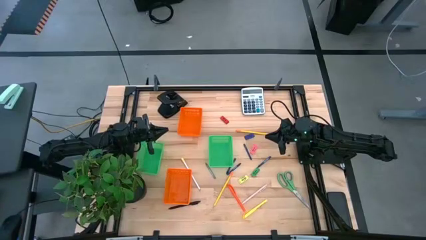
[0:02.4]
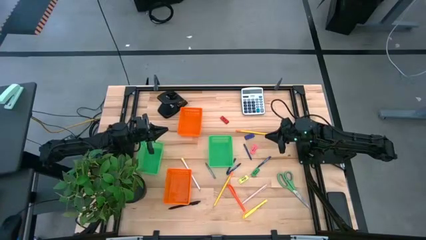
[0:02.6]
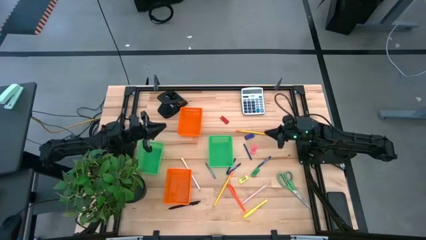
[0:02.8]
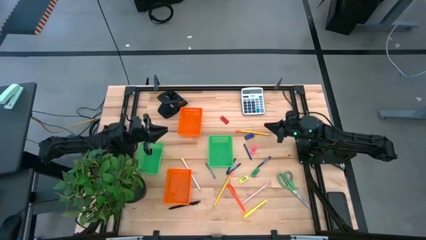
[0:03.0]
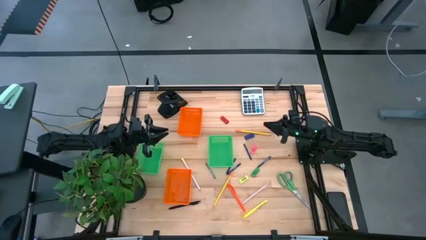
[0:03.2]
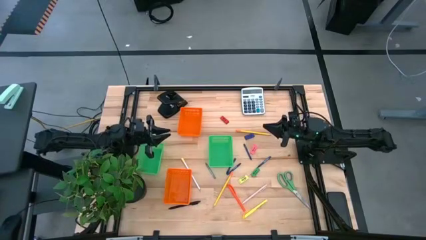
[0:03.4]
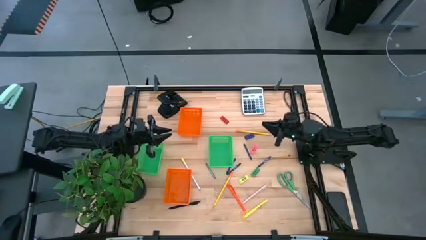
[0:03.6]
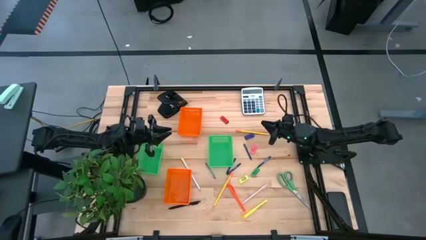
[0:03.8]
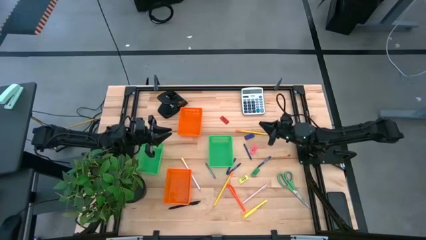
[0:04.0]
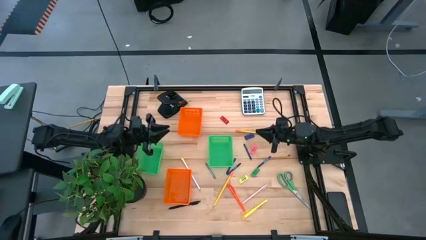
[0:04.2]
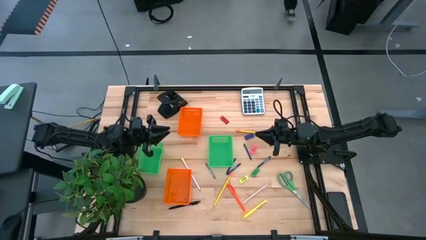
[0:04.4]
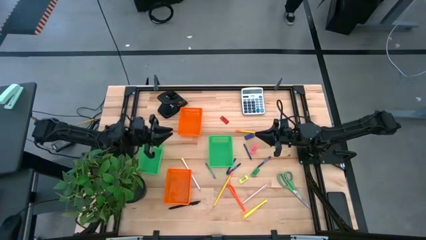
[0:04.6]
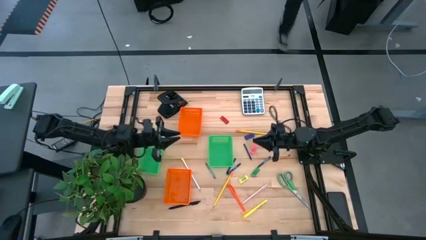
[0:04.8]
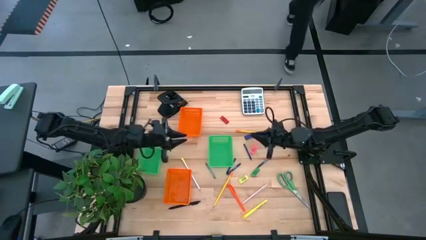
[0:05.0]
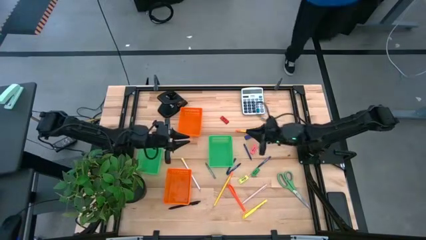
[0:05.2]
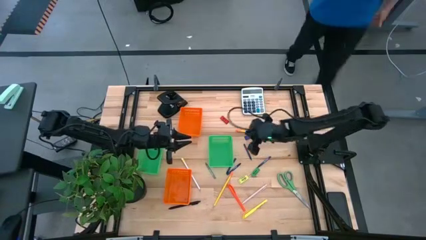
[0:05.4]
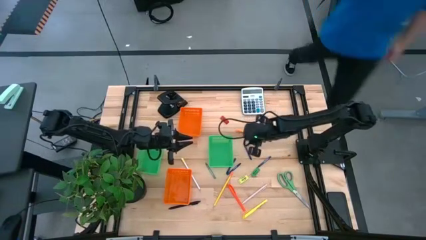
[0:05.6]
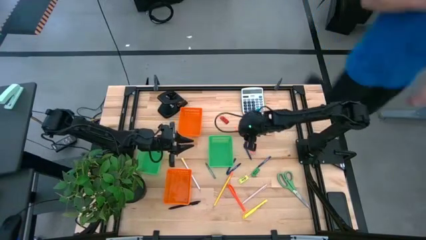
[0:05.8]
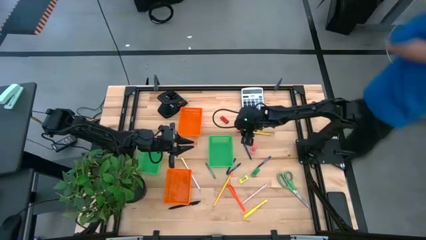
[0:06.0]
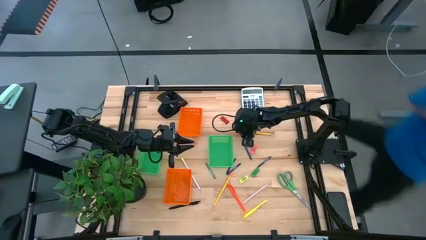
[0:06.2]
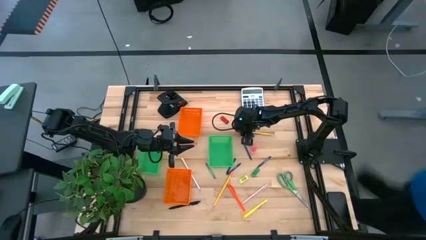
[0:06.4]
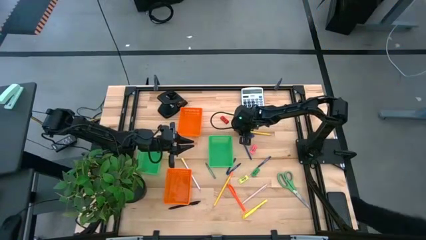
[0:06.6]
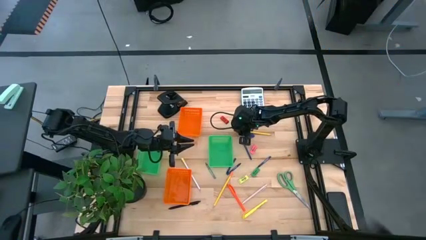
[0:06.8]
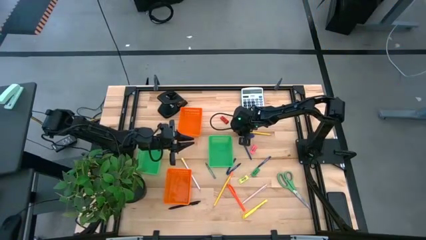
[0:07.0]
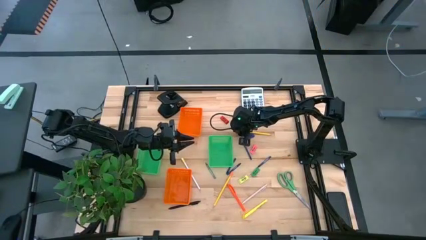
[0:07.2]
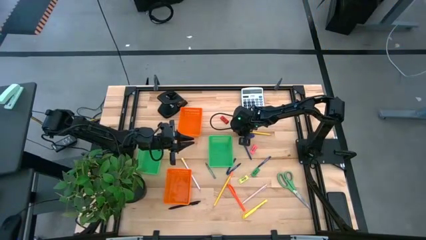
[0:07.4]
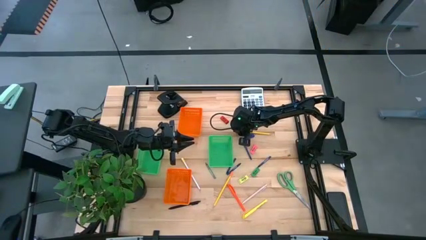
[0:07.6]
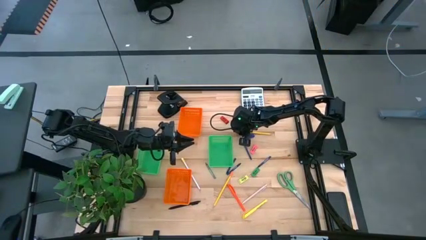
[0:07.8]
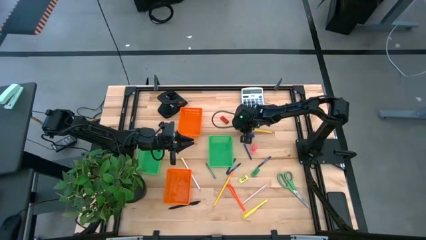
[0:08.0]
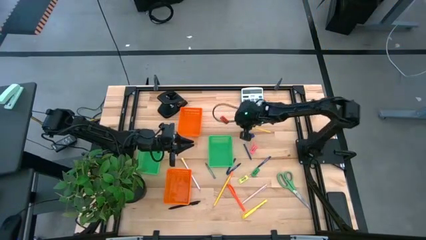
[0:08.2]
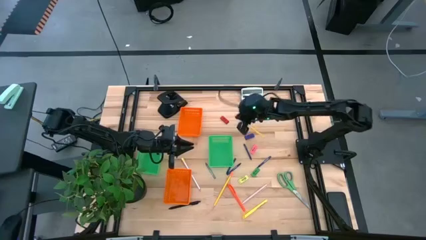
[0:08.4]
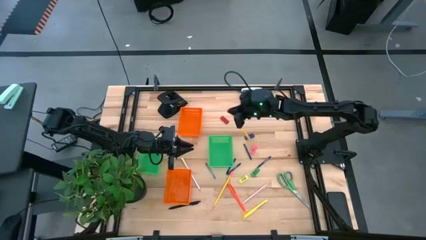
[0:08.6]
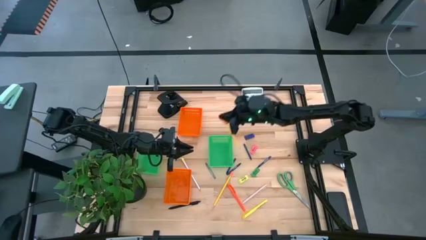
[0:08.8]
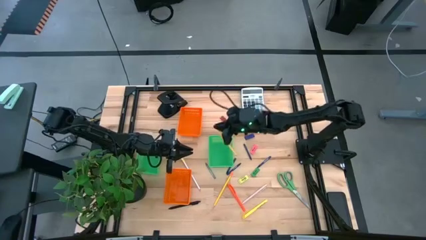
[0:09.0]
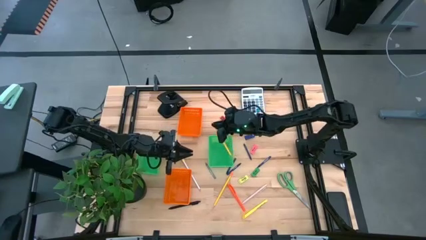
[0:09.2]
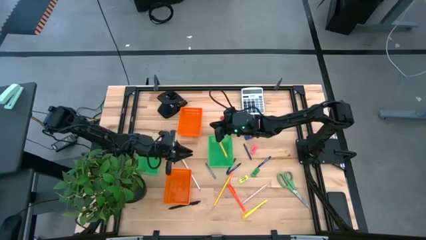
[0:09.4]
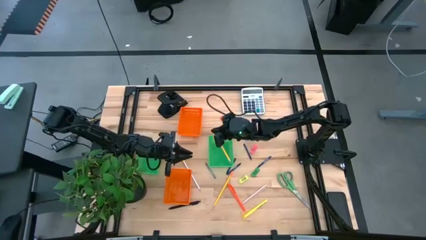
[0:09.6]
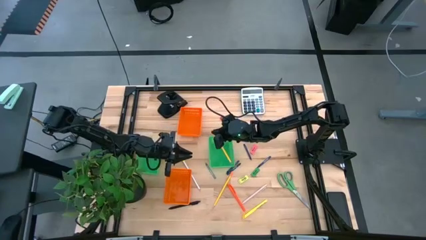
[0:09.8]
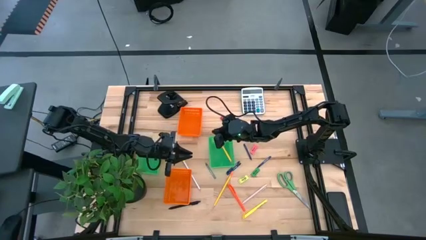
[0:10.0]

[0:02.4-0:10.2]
Task: Sort crayons/erasers/pens/pencils in bins
Put the yellow pencil into the right green basket

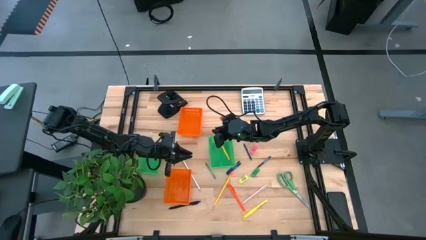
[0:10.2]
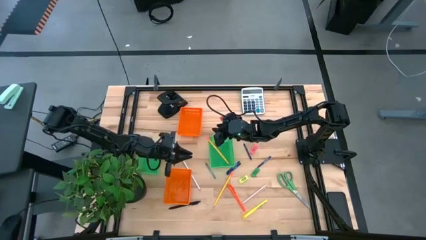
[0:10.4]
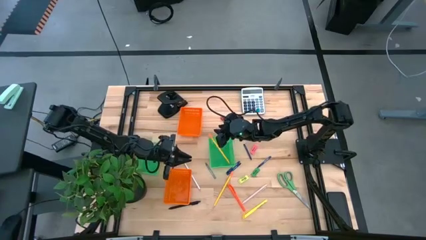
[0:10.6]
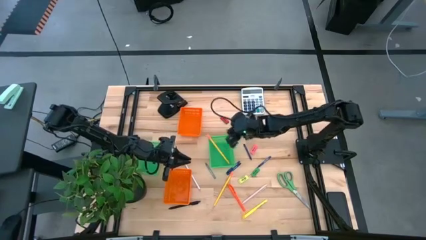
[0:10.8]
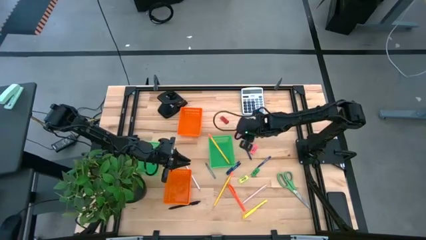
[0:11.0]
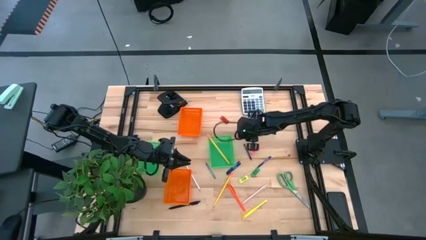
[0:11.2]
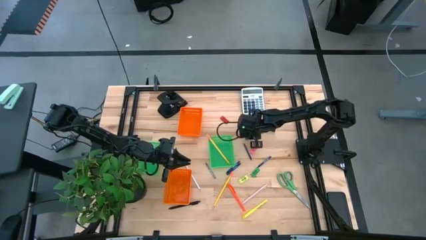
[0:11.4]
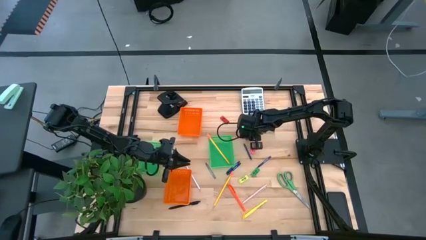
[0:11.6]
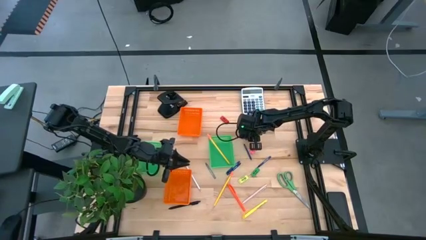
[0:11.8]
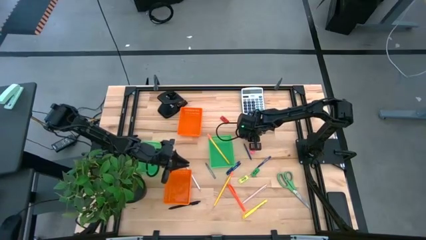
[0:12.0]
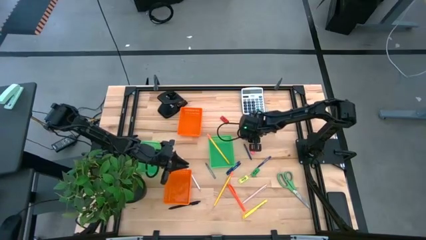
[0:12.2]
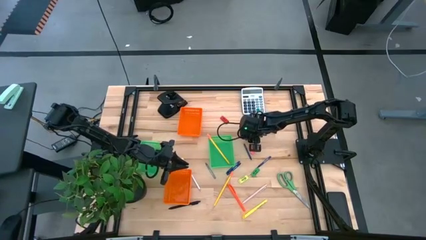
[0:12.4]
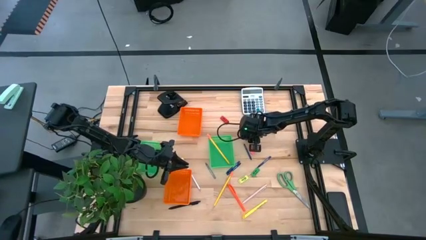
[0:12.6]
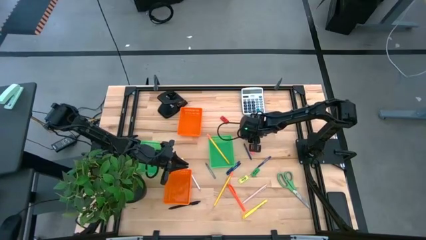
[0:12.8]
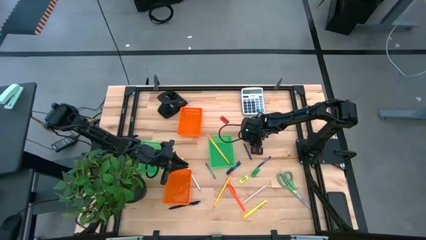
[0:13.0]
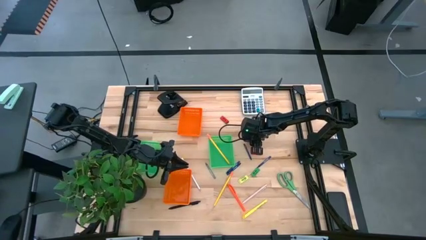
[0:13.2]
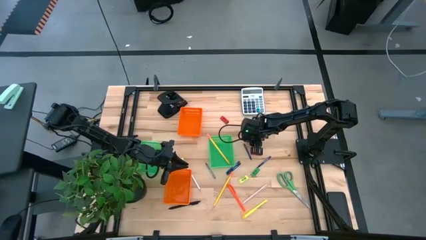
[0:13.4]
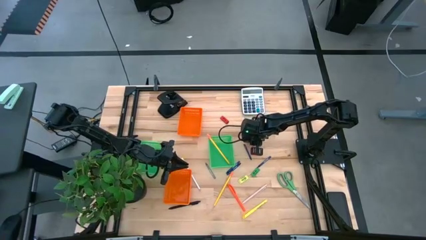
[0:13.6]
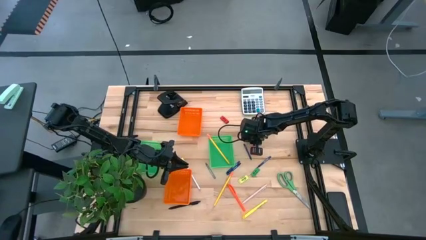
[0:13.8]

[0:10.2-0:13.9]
Put the blue eraser into the top orange basket

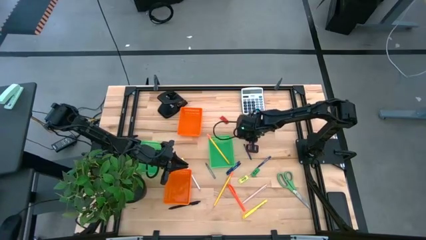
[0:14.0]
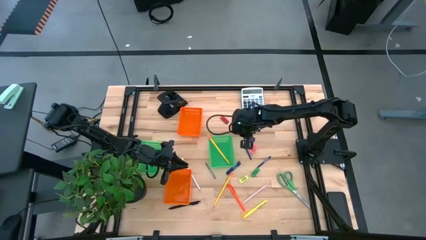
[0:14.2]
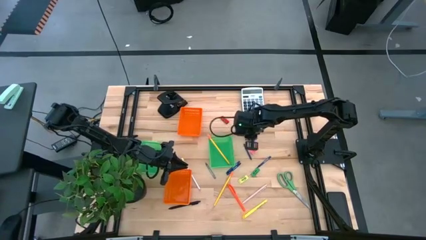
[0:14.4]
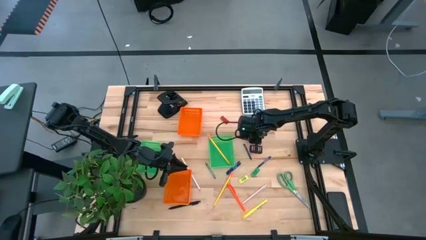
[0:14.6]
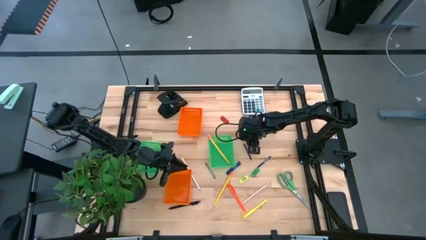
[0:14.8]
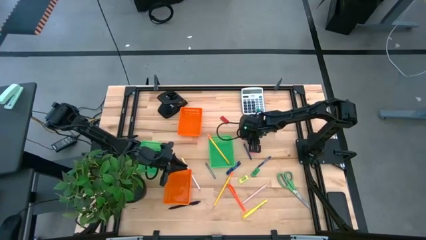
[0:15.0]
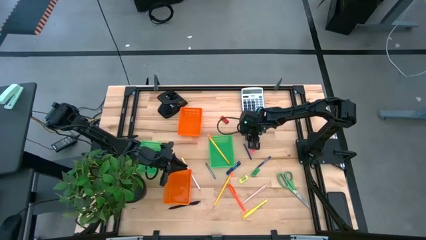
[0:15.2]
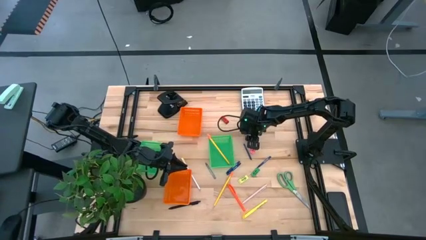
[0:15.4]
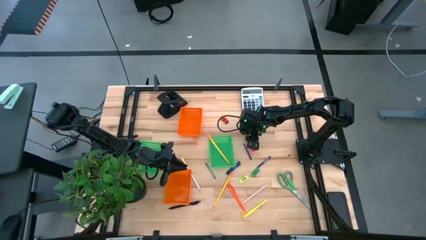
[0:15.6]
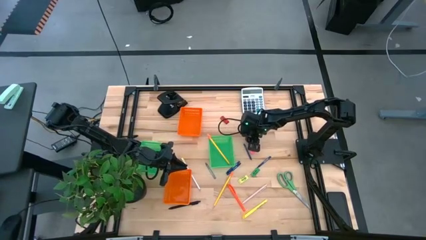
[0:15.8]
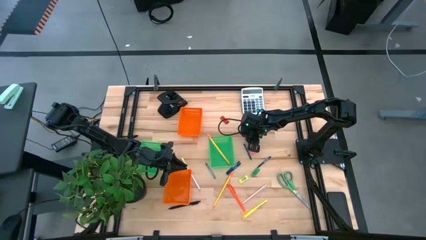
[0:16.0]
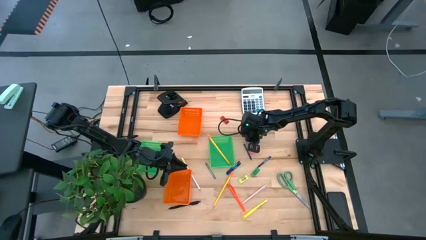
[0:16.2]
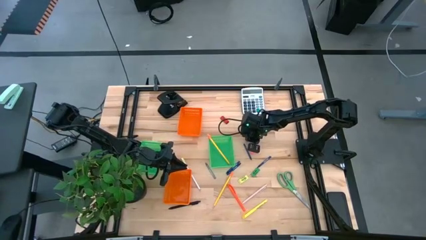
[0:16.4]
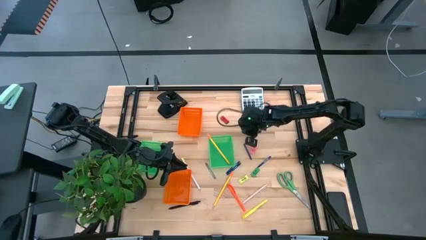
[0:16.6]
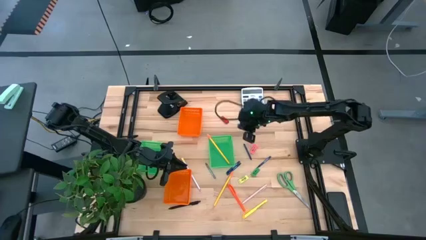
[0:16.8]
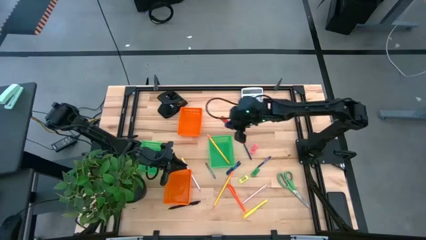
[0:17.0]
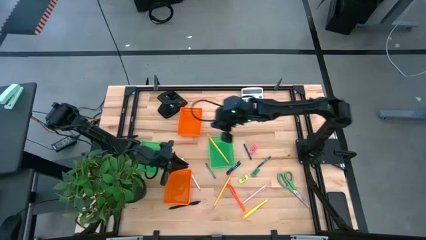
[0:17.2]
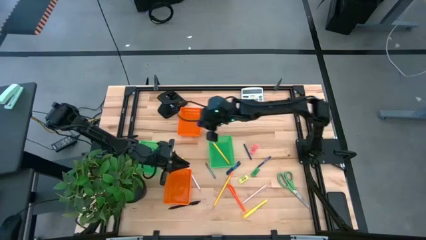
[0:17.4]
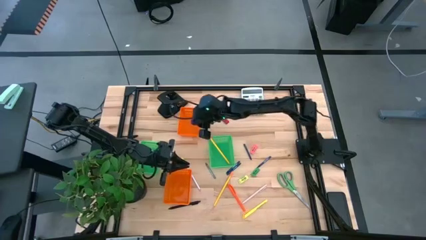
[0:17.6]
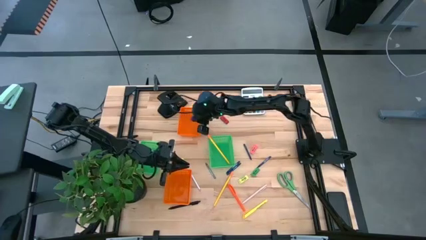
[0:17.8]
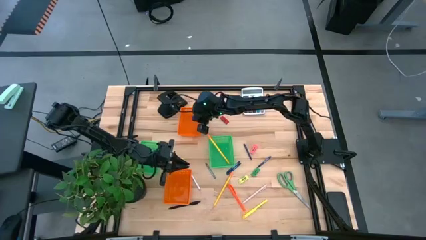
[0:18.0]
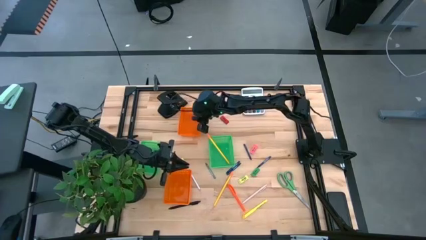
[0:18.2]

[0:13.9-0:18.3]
Put the blue eraser into the top orange basket

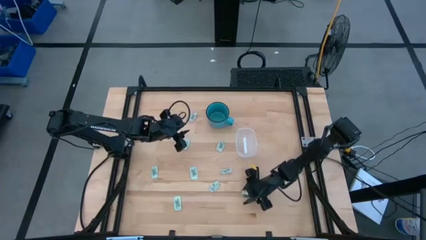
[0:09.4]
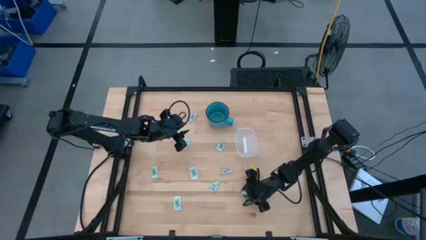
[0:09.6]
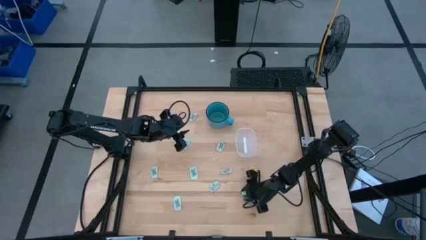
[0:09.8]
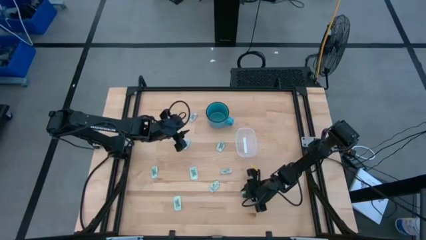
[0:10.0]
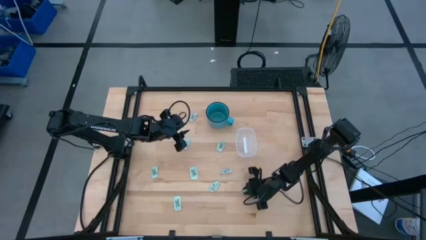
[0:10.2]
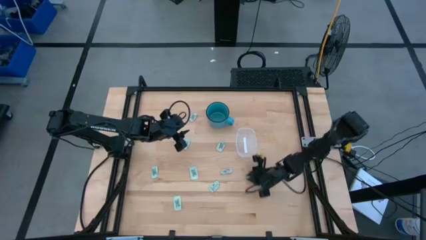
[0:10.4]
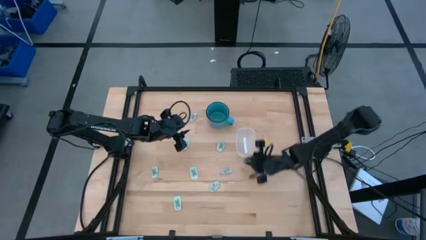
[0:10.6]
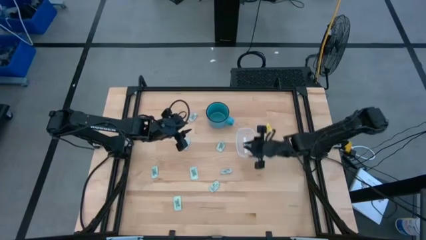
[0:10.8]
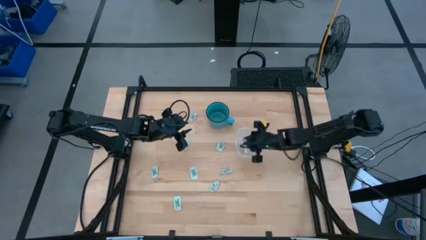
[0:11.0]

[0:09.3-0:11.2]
Task: Pick and place Stevia / Truvia into bins
Put the truvia packet into the transparent bin
